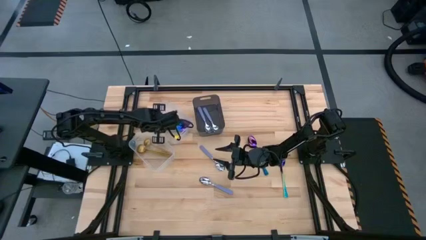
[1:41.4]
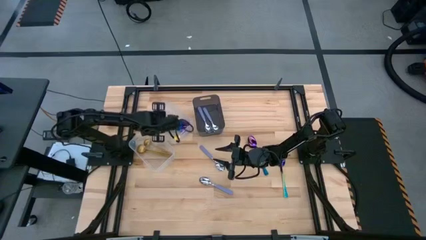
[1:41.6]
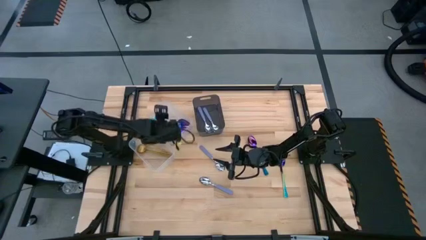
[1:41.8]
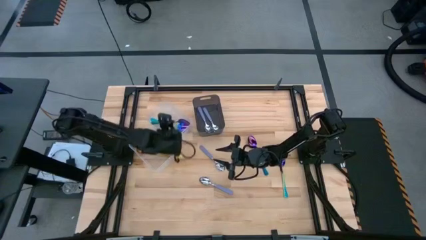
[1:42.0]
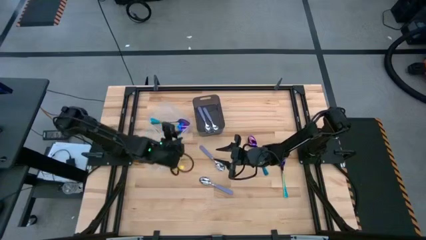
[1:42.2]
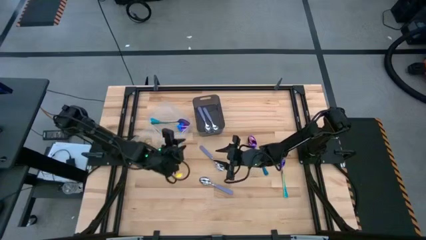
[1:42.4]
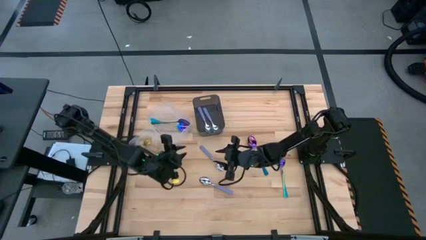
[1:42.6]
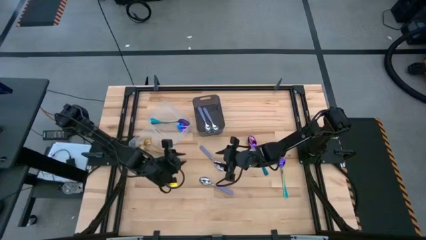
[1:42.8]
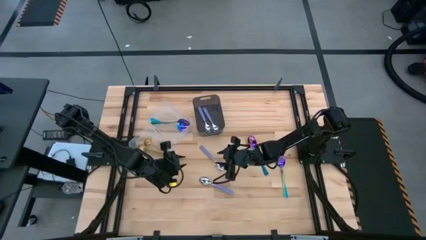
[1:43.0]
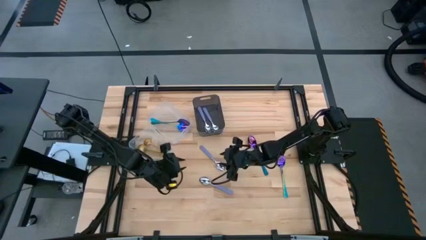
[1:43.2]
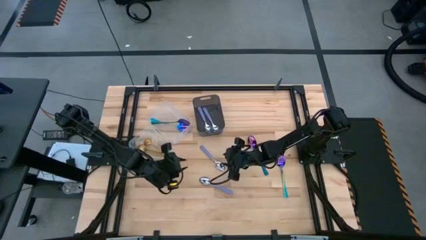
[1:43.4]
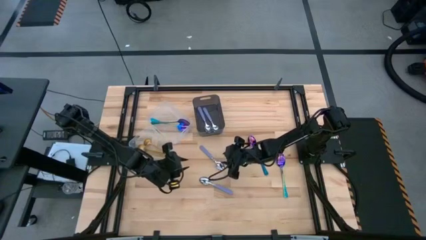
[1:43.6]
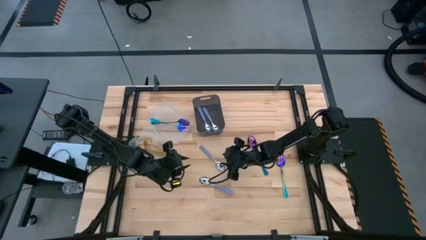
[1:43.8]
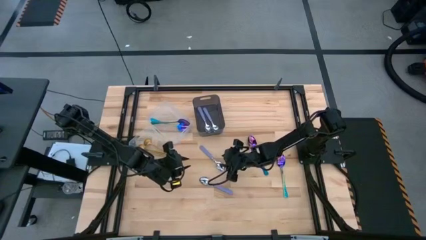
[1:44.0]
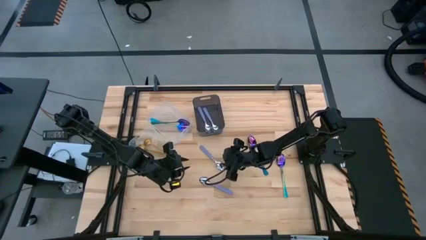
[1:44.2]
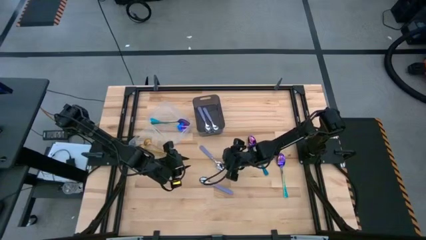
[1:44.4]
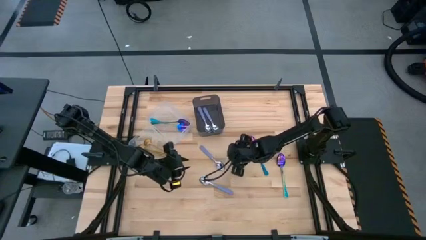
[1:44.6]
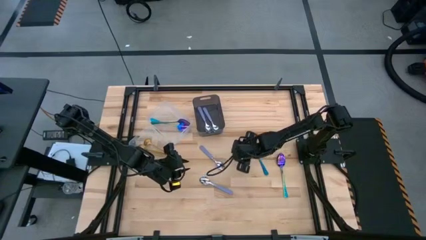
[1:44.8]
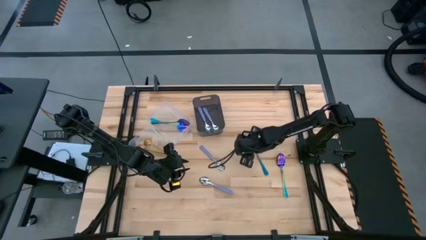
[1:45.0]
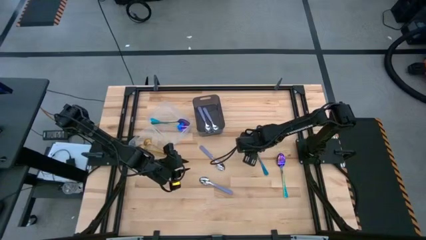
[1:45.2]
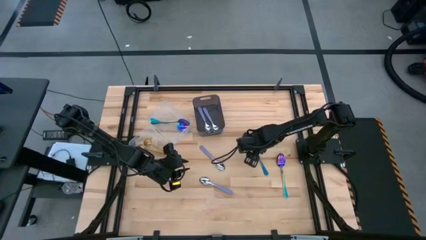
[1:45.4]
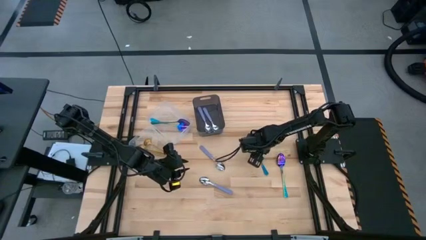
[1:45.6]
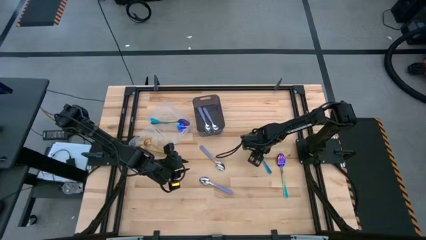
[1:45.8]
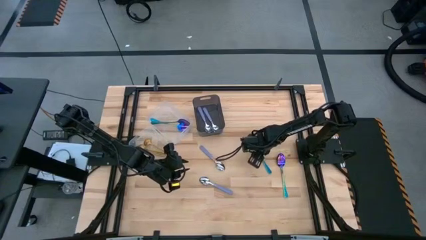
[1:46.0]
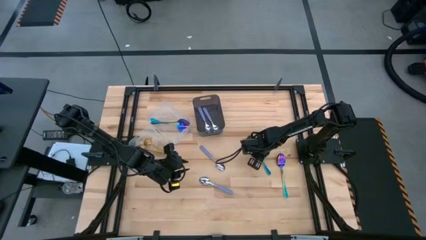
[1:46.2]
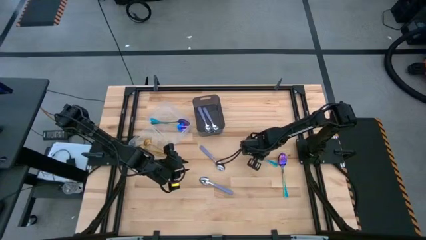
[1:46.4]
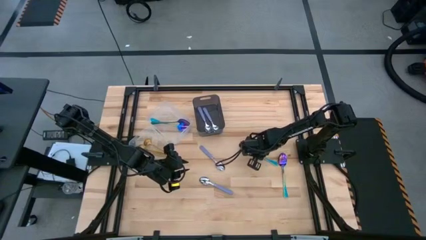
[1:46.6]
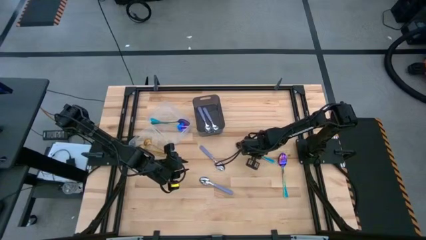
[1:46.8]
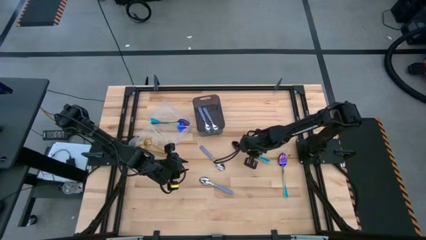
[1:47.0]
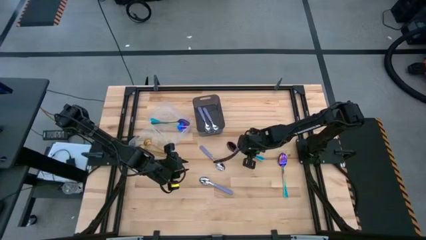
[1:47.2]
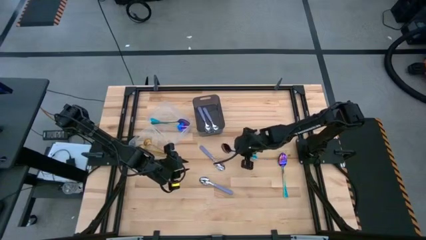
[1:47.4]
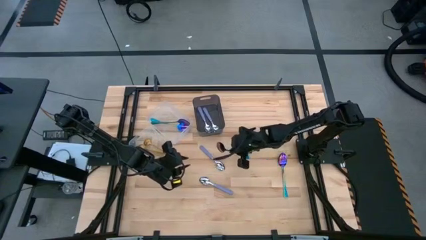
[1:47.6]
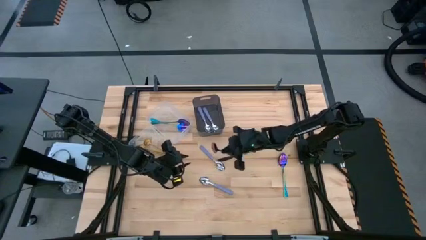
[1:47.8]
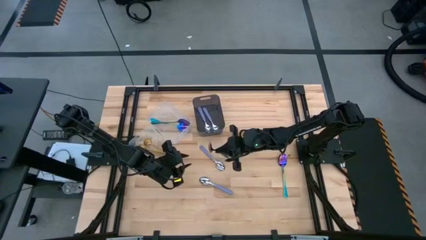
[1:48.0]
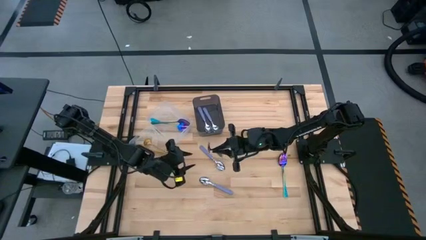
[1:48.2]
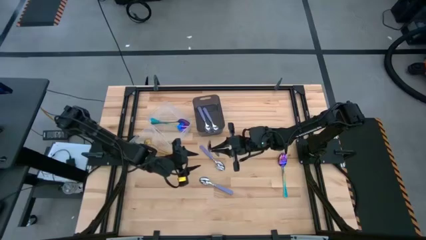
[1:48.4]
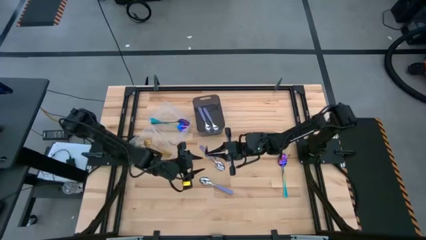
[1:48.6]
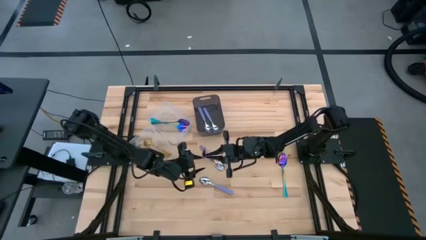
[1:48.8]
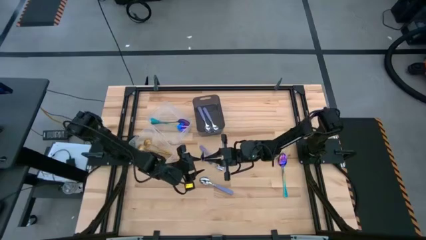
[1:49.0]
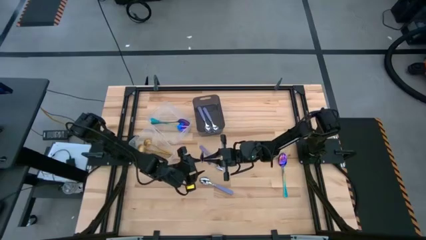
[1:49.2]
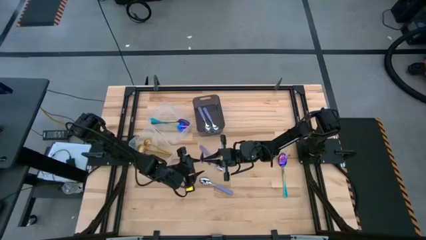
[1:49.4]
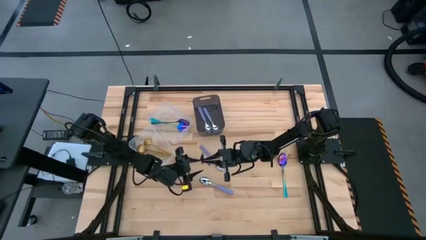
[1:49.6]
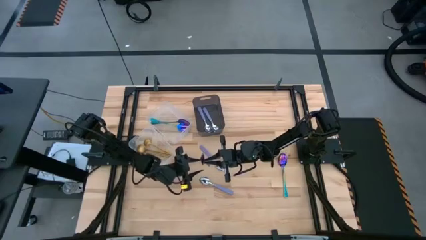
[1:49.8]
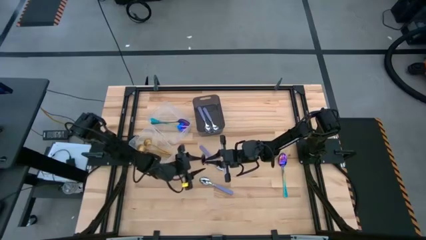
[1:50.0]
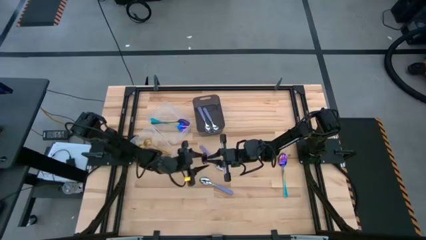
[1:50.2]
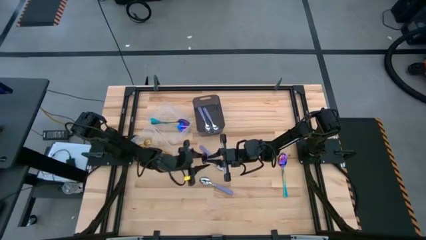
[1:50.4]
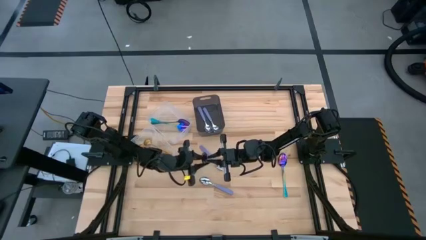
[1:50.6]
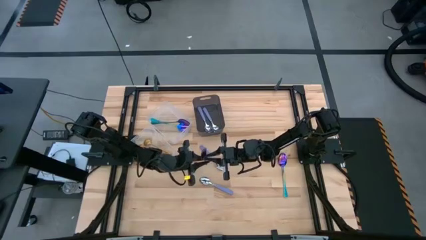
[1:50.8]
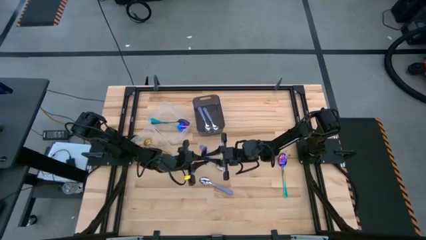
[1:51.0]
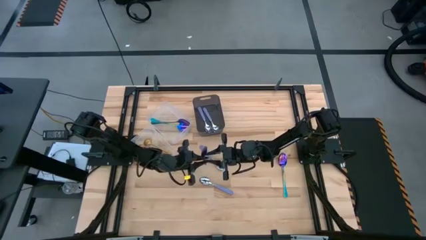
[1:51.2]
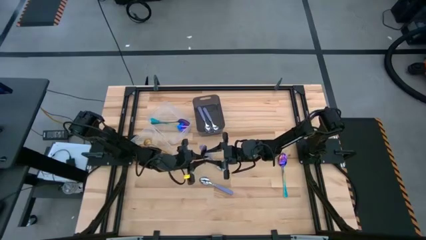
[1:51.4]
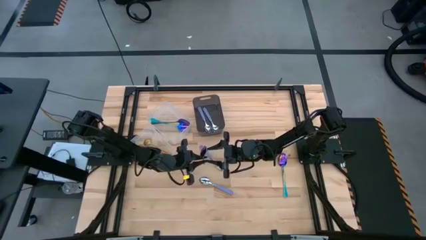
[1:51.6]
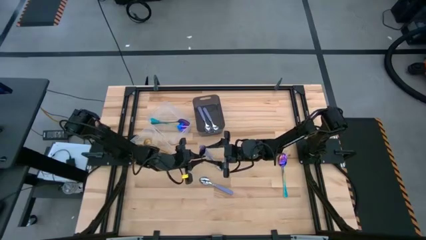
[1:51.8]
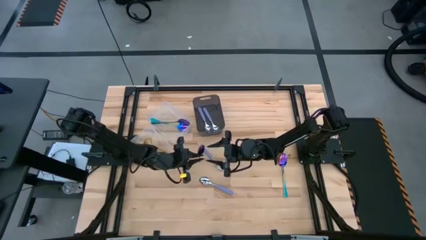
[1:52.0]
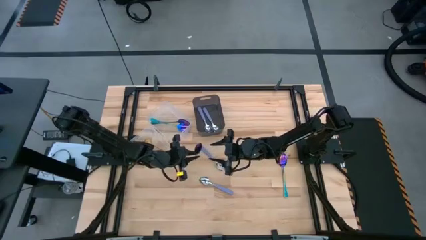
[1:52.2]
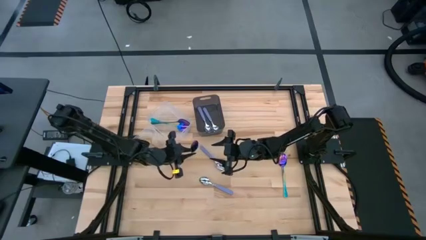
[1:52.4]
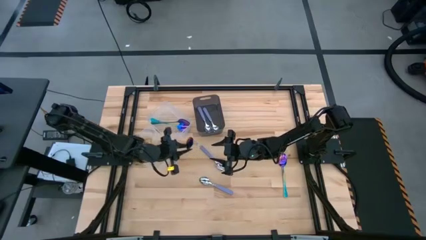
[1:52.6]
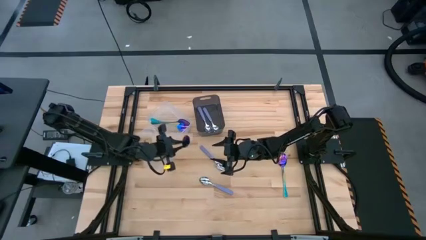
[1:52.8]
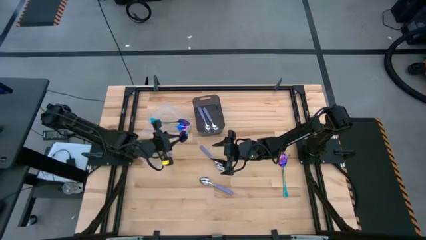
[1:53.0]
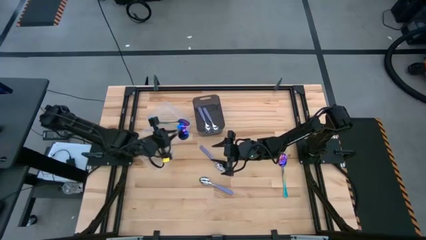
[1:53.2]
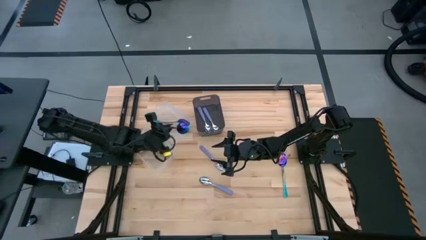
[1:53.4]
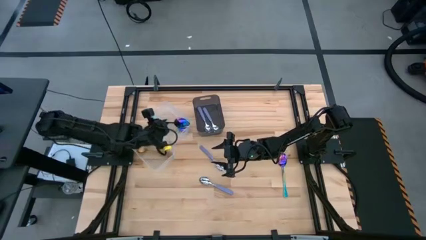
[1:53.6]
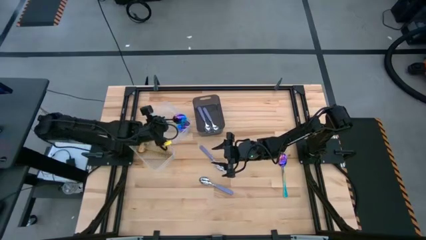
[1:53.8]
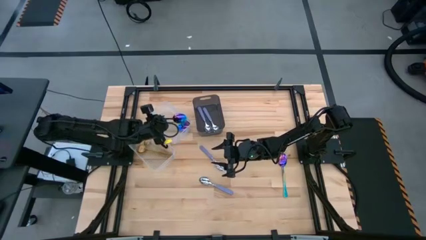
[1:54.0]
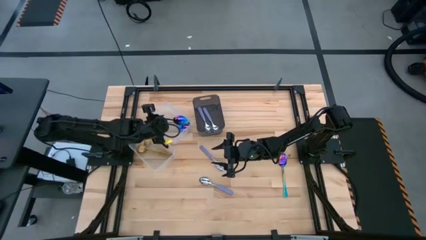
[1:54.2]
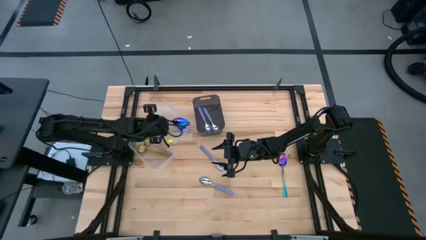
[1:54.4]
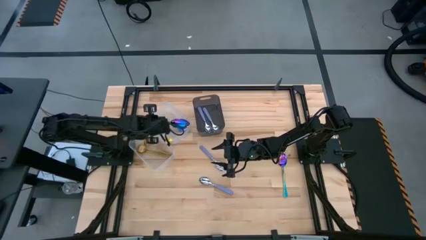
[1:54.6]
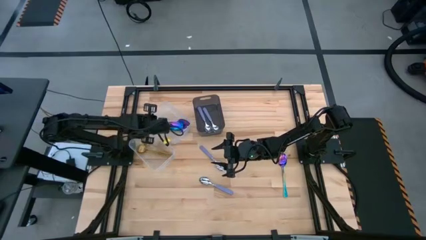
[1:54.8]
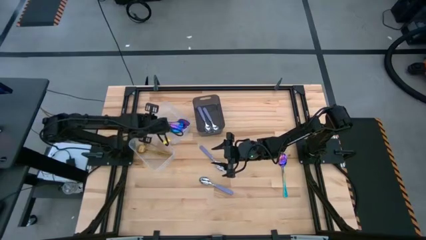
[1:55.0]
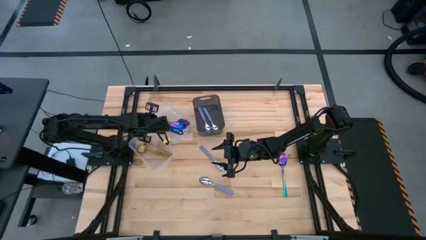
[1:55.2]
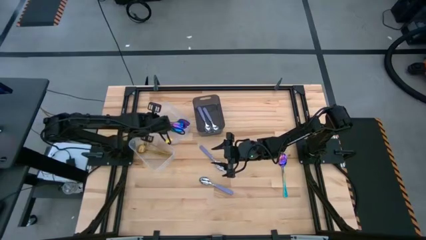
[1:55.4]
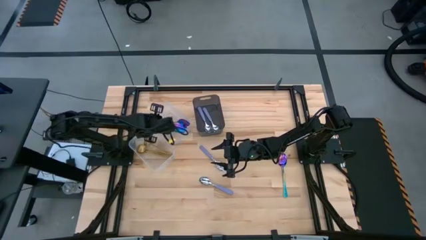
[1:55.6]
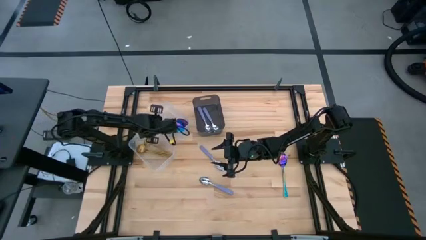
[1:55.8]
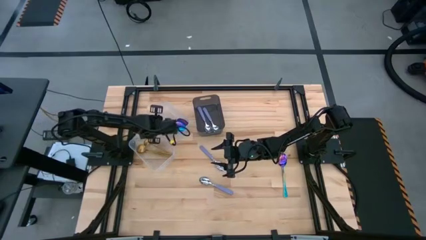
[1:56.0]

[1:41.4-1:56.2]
Task: Sort silverware by color (type)
Put the blue spoon into the top transparent bin
